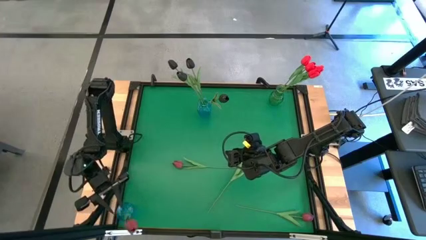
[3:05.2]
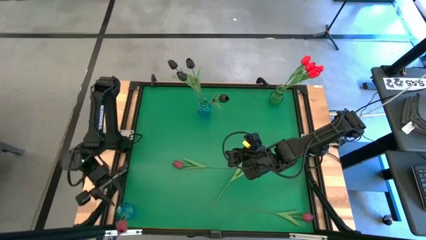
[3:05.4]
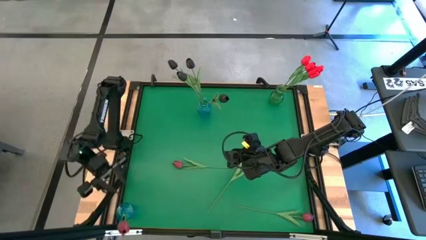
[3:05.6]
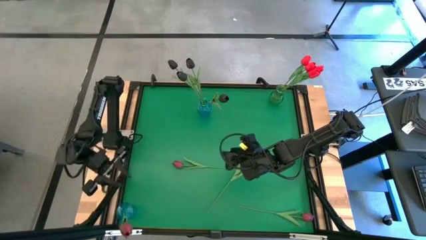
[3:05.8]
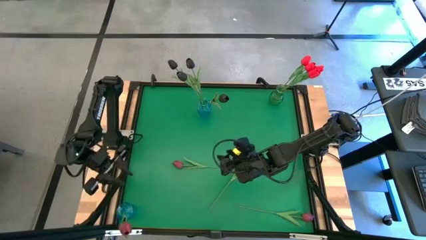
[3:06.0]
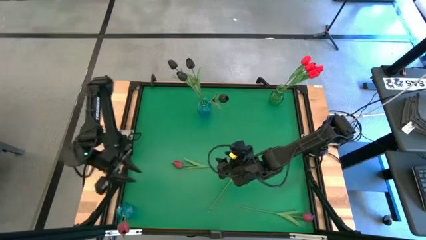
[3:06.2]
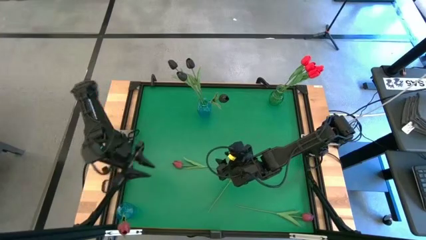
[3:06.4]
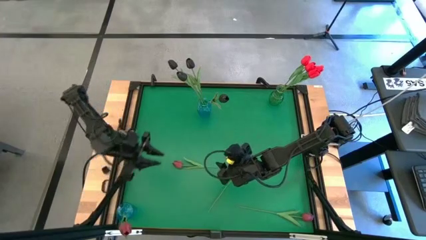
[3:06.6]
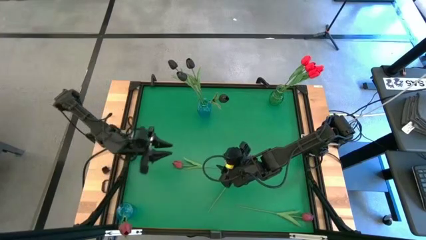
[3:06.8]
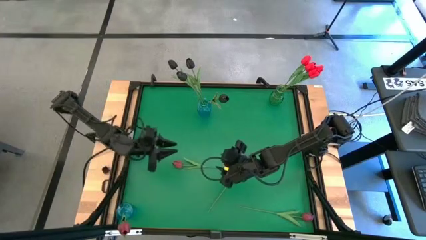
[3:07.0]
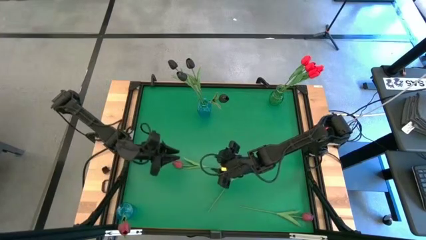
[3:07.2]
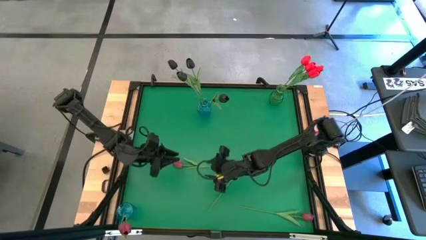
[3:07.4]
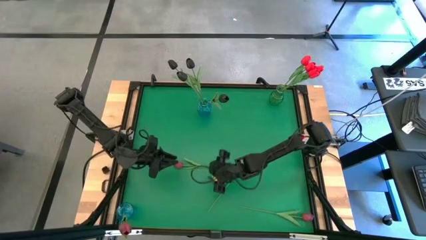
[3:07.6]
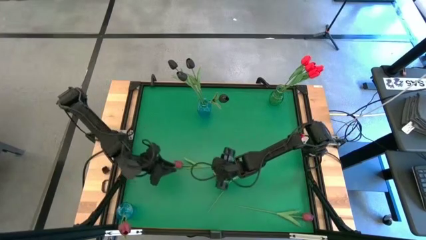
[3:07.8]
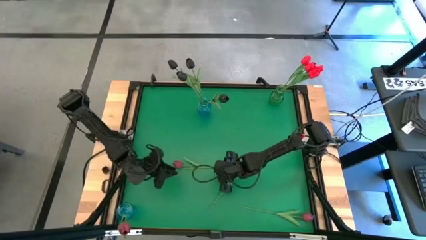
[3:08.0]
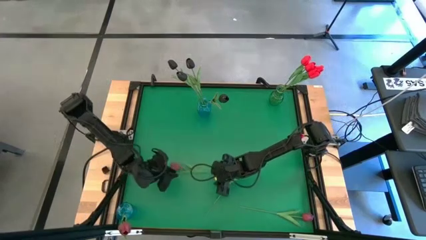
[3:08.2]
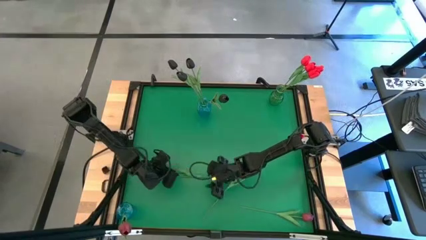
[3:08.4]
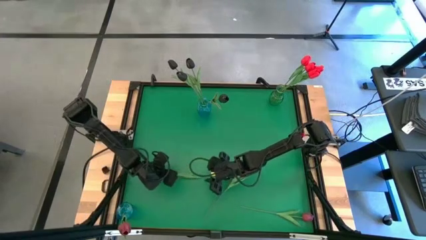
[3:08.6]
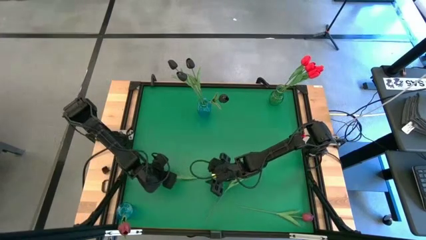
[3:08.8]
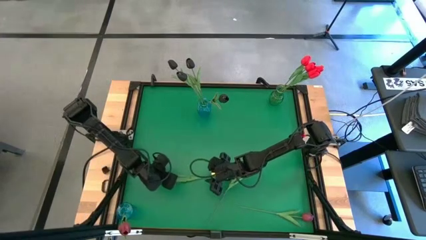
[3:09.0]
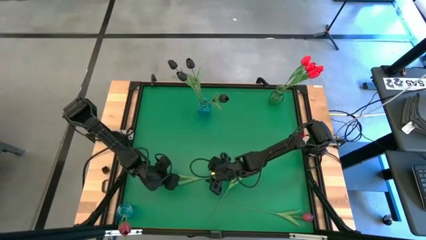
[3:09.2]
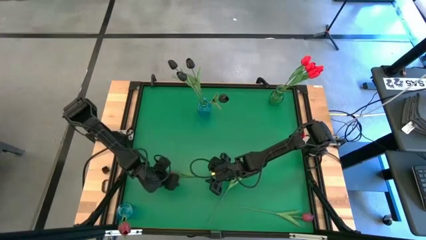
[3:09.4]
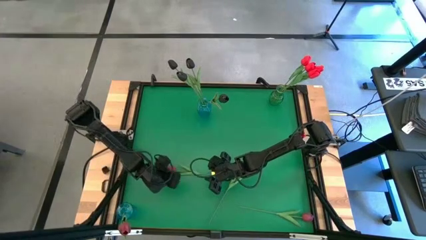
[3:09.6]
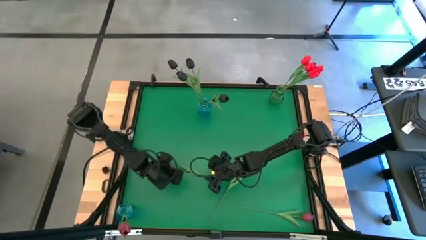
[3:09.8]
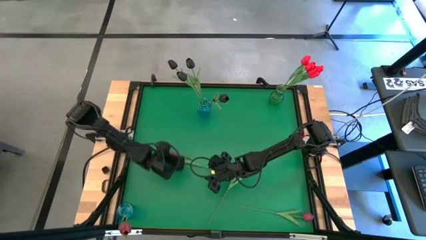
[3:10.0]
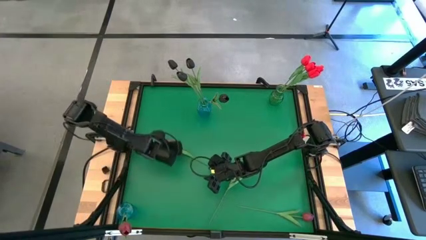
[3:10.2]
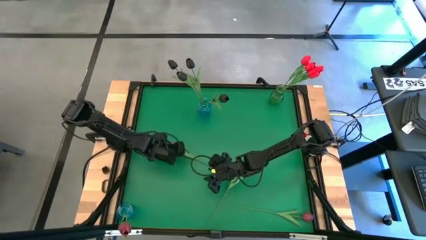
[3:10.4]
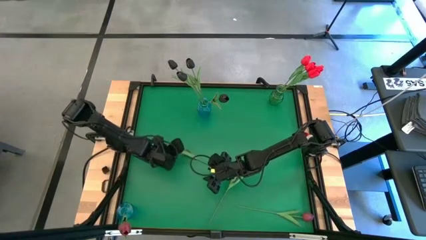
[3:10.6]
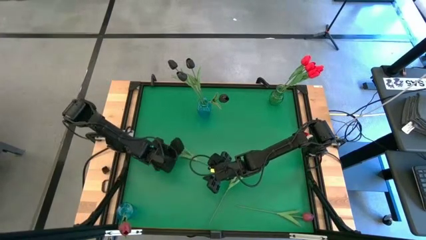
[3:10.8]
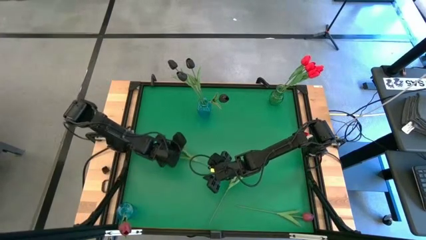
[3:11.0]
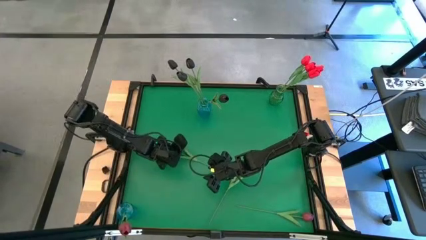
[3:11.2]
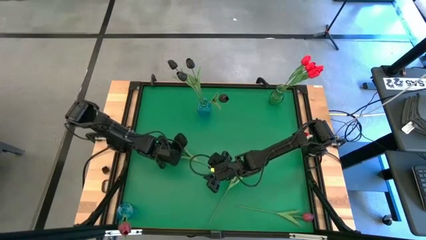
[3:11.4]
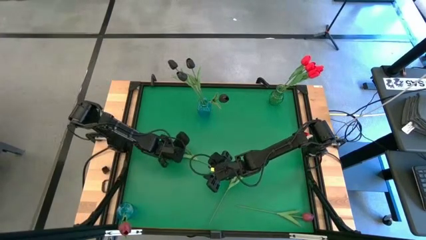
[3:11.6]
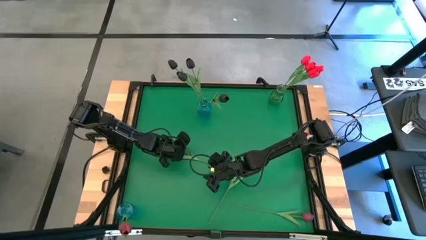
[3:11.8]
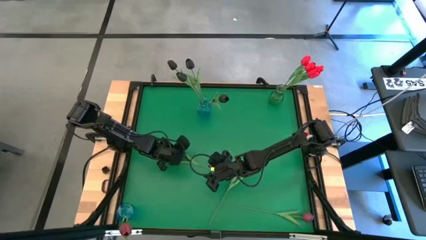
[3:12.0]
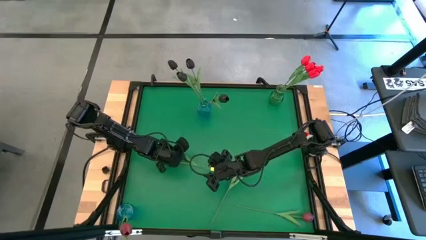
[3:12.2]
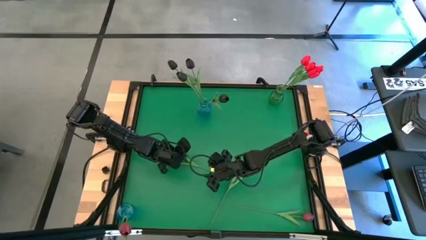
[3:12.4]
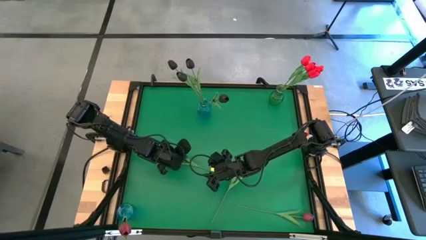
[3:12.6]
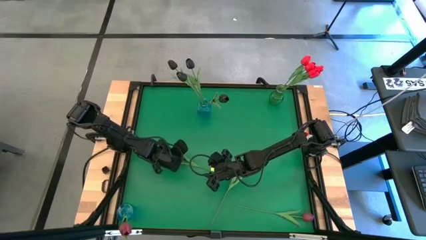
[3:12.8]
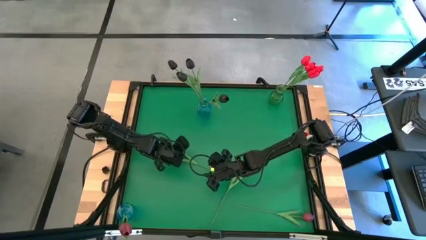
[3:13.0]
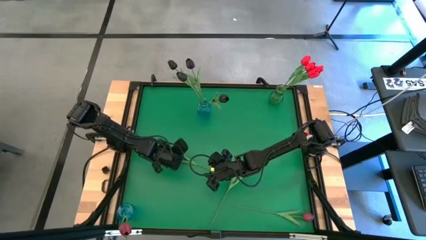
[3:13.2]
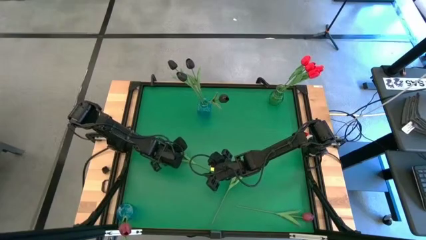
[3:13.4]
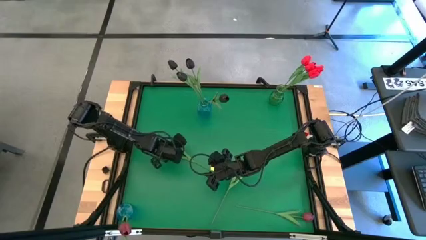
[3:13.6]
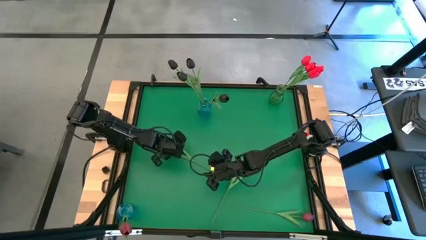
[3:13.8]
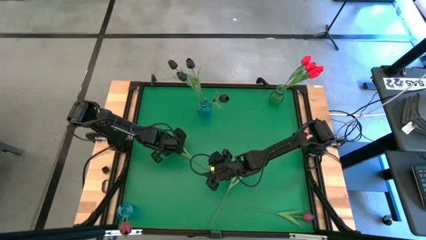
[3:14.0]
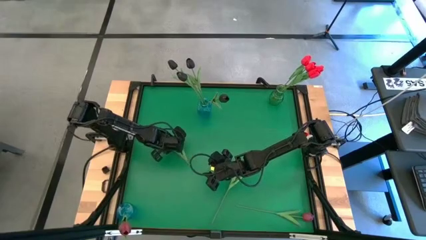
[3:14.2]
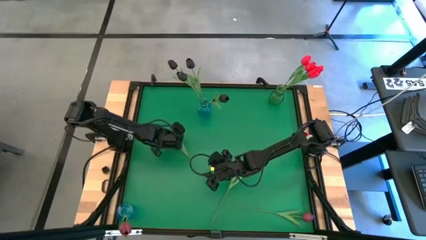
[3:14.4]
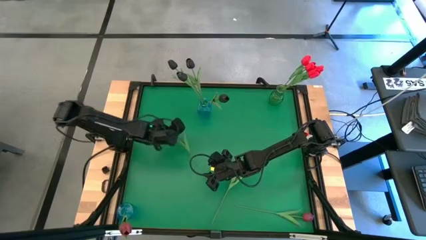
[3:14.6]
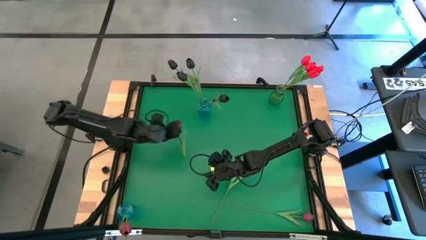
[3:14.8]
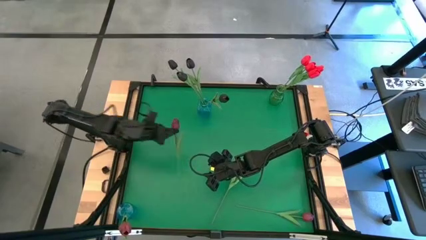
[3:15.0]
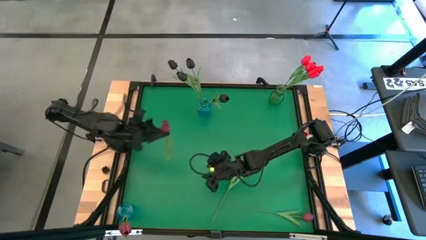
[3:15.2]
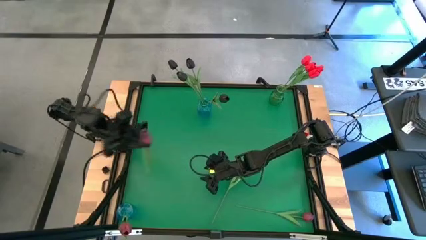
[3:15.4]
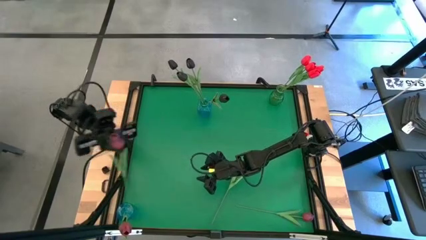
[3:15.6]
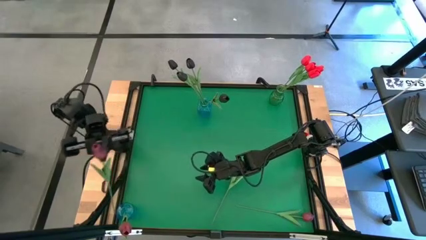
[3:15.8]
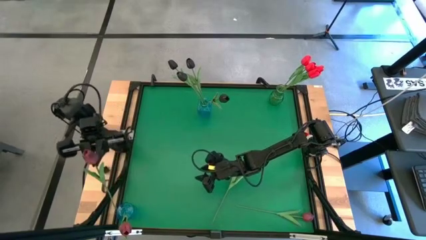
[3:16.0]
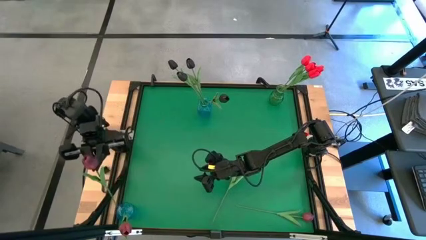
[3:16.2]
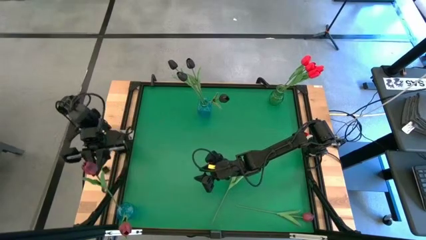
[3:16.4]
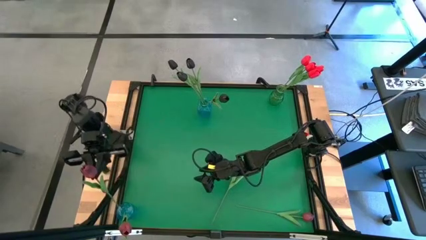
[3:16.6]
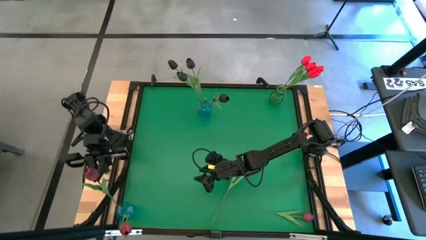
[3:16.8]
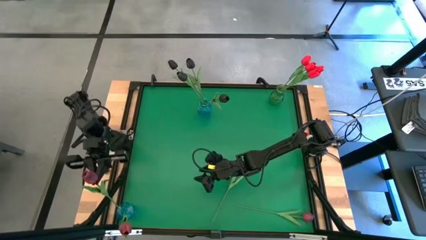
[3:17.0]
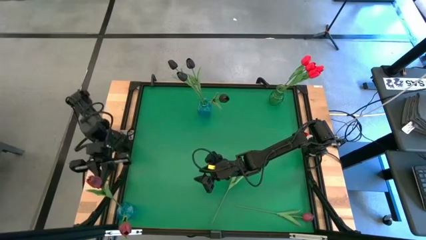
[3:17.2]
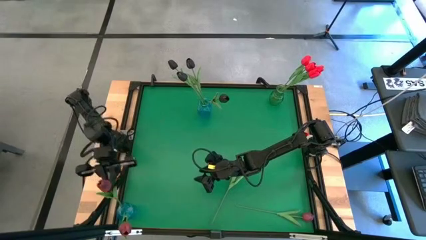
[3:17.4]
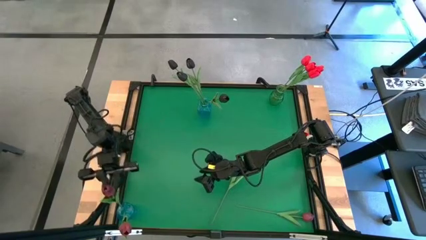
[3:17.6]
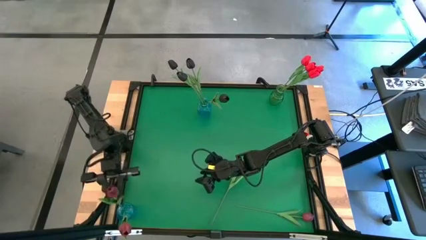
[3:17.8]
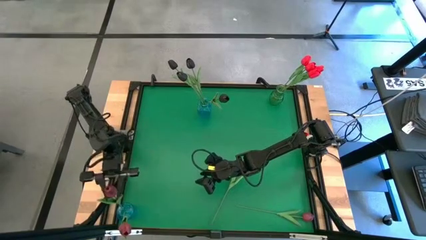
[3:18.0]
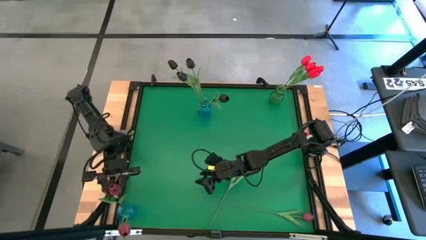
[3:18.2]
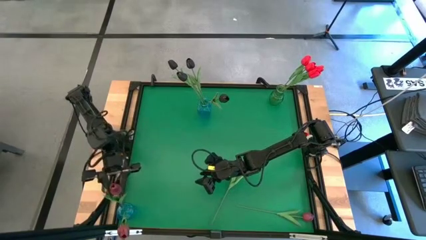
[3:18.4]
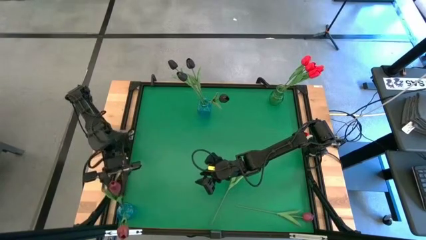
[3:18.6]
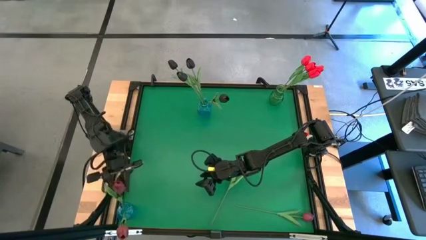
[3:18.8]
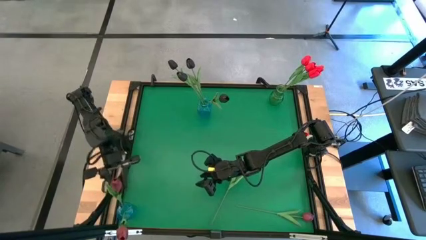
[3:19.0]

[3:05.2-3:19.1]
Task: Sort flowers into vase by color
Put the pink tulip into the bottom blue vase

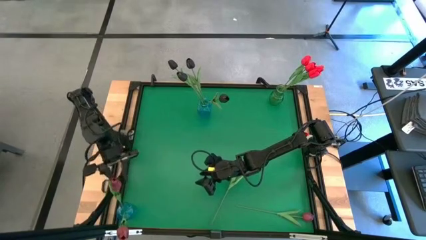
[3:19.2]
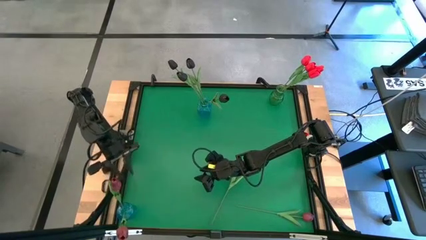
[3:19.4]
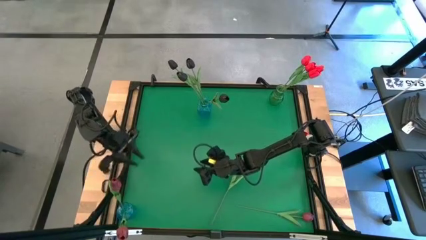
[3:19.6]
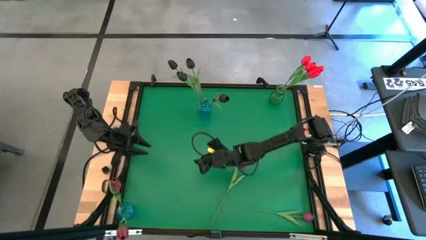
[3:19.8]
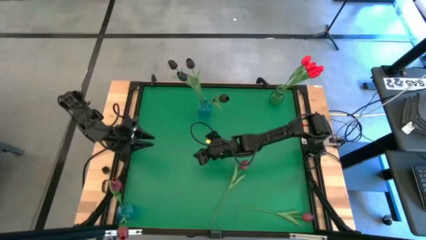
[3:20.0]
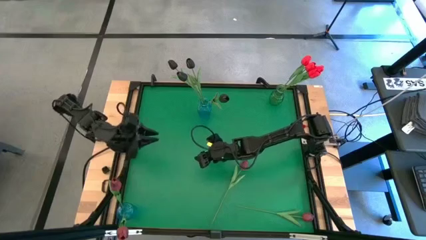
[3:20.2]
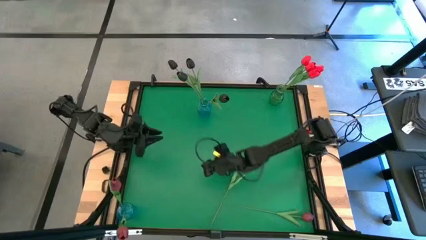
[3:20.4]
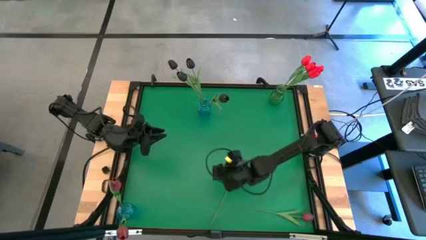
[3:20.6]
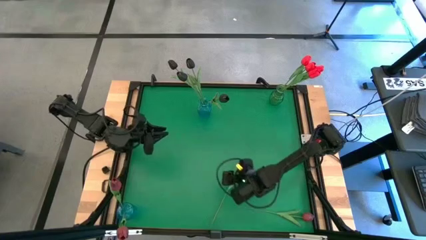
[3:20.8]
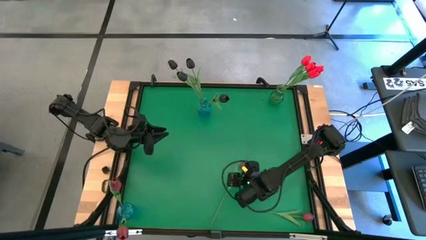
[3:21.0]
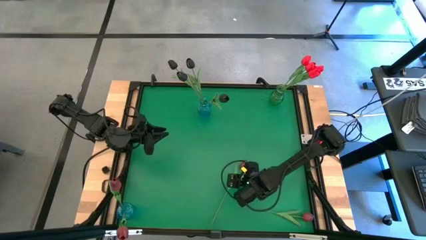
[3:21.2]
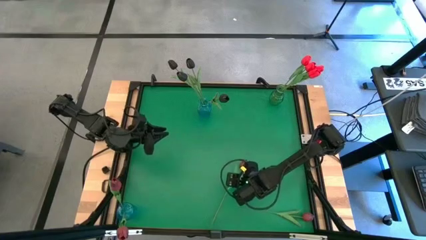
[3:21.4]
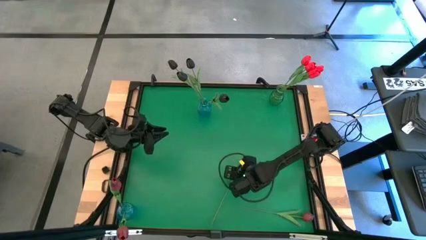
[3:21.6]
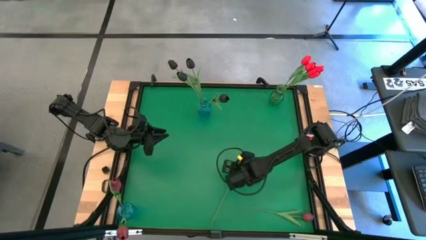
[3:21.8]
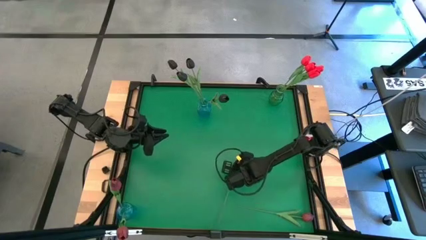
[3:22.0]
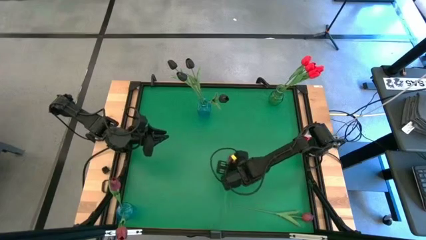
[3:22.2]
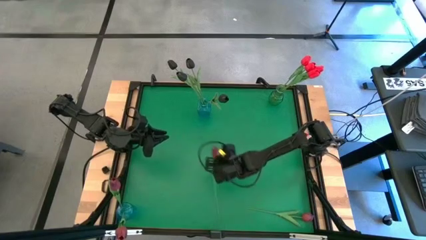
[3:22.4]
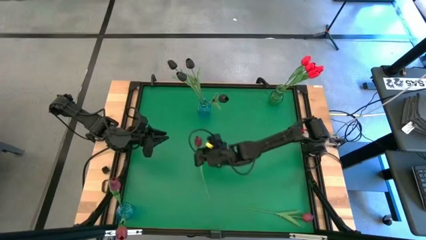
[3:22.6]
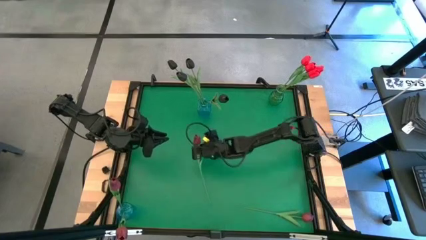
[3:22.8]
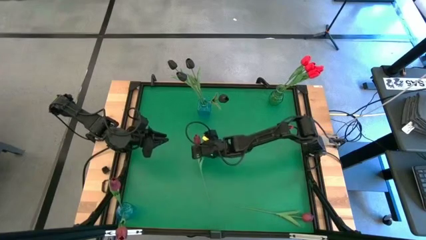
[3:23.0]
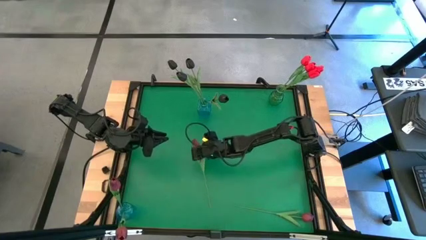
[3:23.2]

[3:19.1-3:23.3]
Adjust the pink tulip on the center table
